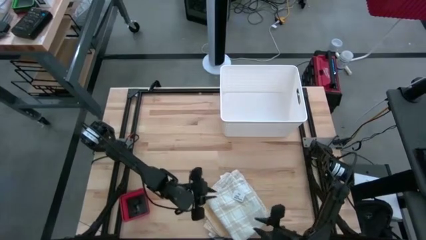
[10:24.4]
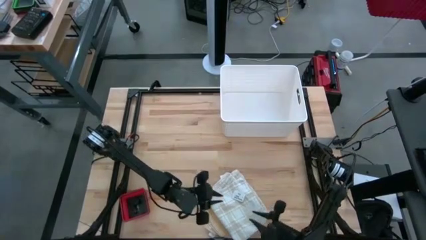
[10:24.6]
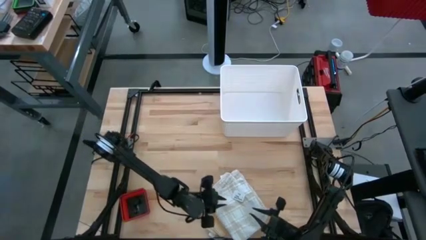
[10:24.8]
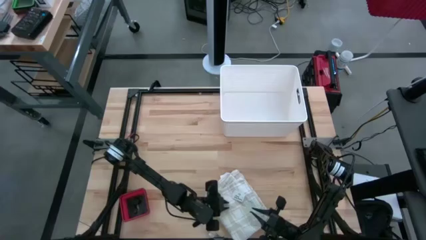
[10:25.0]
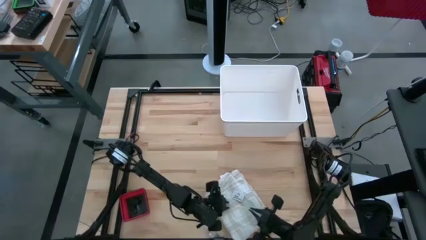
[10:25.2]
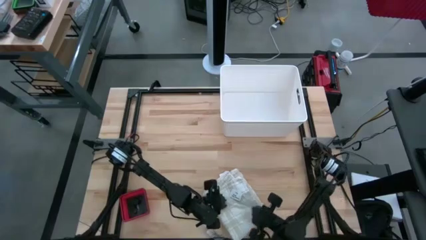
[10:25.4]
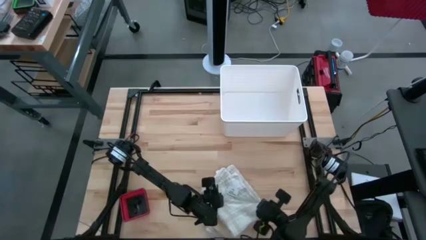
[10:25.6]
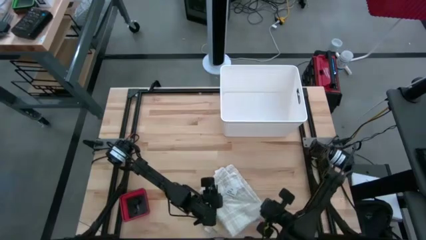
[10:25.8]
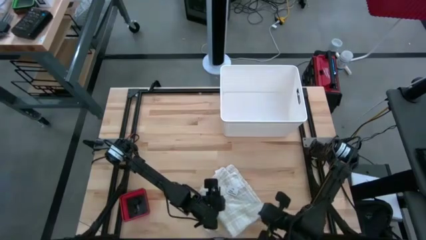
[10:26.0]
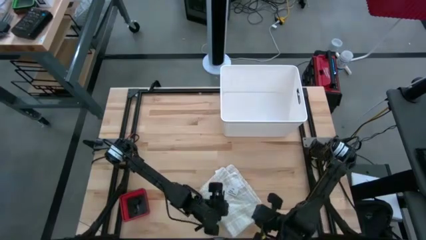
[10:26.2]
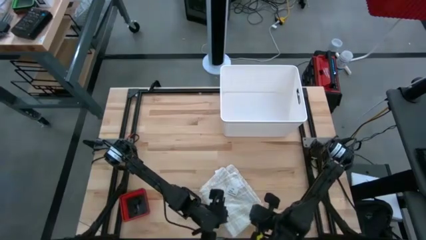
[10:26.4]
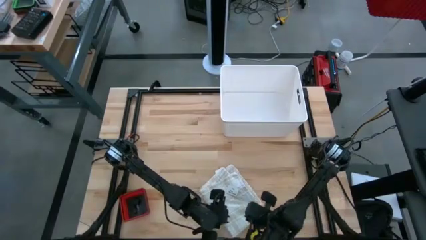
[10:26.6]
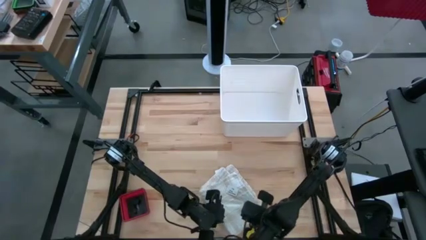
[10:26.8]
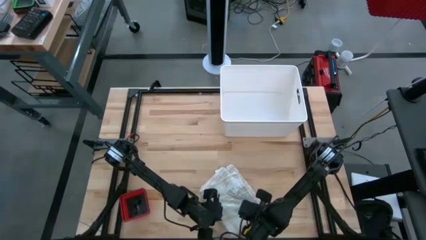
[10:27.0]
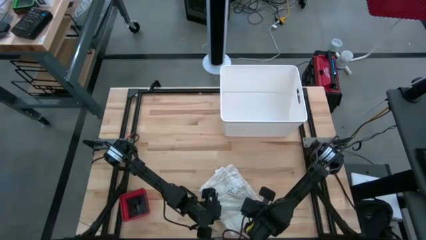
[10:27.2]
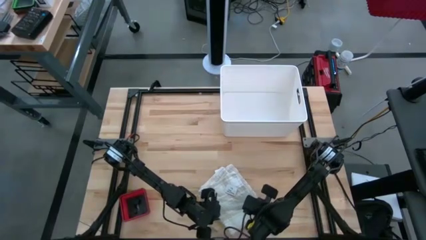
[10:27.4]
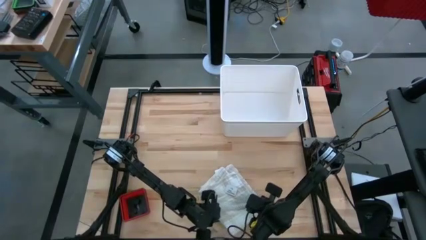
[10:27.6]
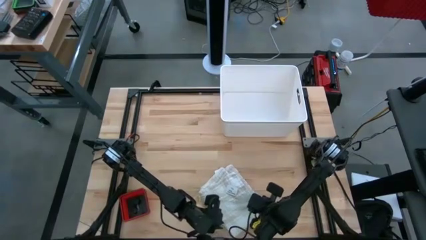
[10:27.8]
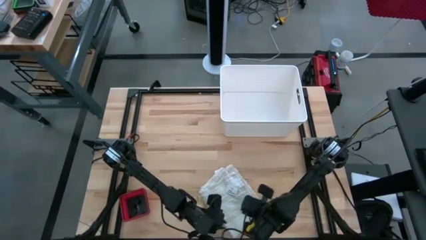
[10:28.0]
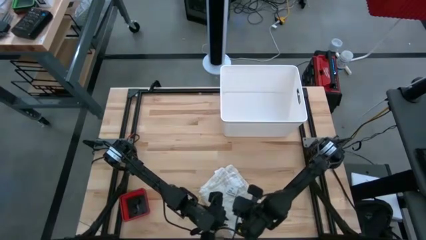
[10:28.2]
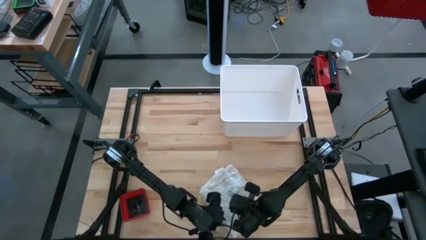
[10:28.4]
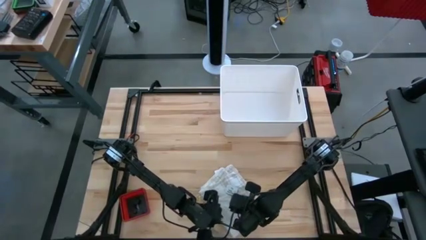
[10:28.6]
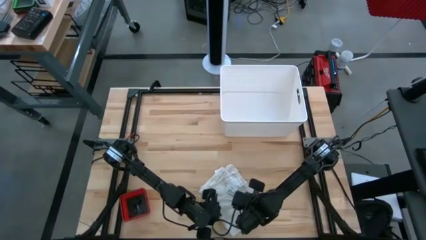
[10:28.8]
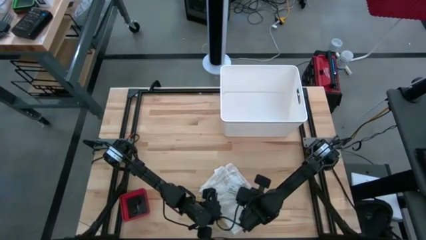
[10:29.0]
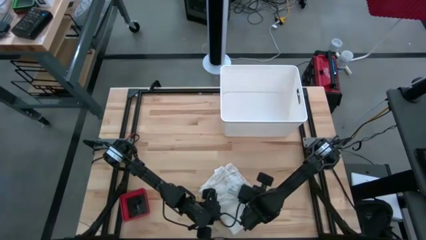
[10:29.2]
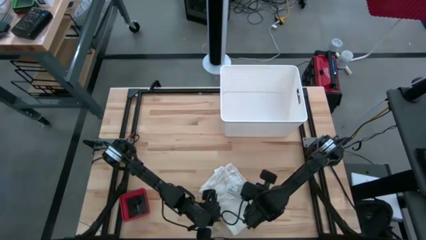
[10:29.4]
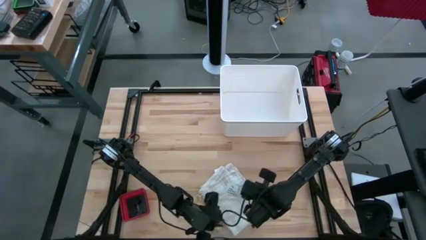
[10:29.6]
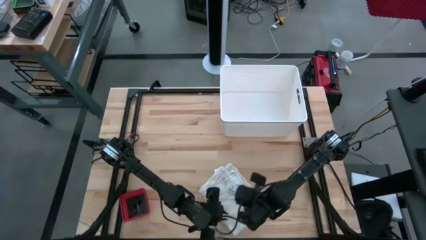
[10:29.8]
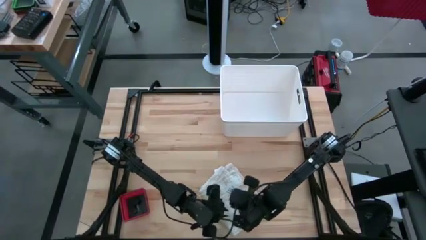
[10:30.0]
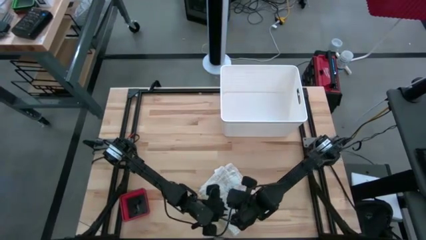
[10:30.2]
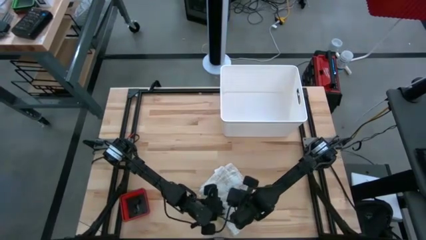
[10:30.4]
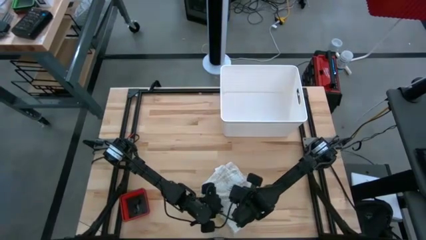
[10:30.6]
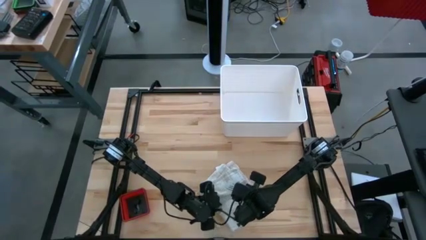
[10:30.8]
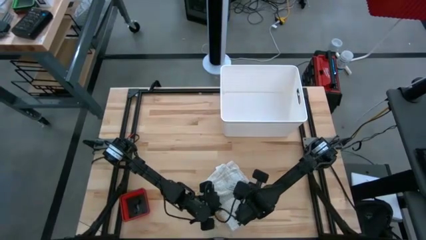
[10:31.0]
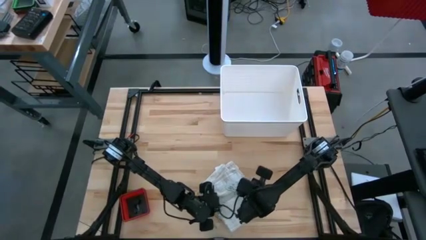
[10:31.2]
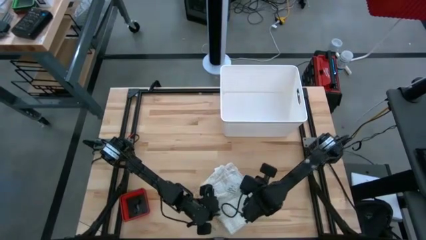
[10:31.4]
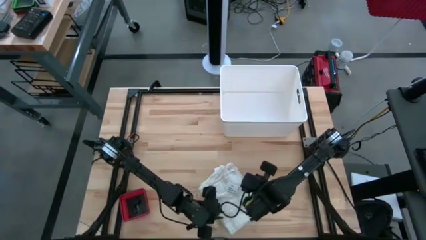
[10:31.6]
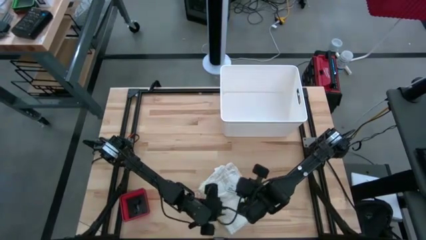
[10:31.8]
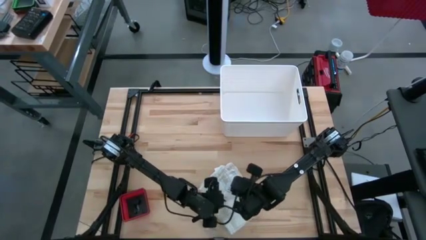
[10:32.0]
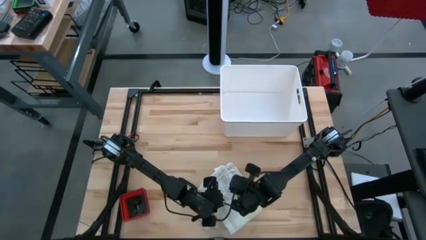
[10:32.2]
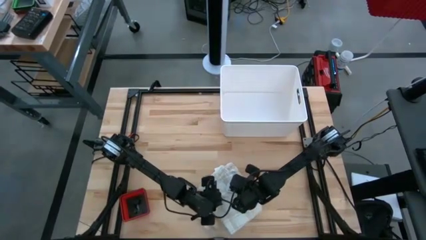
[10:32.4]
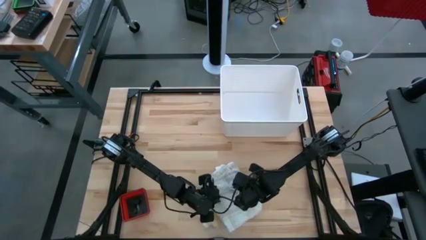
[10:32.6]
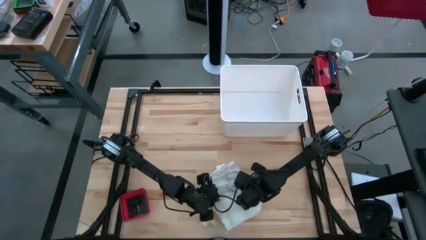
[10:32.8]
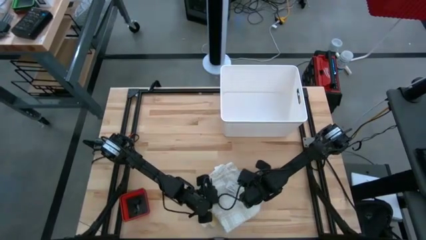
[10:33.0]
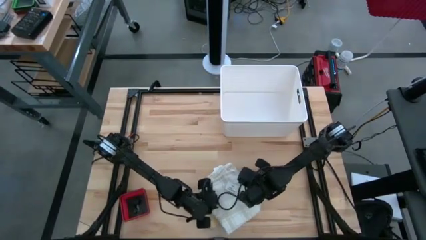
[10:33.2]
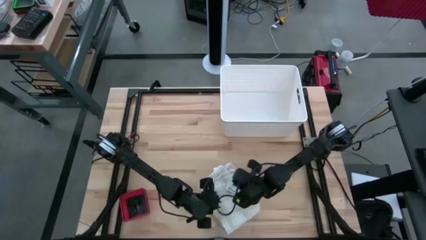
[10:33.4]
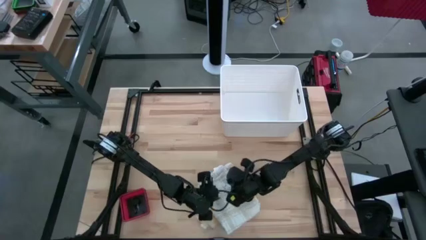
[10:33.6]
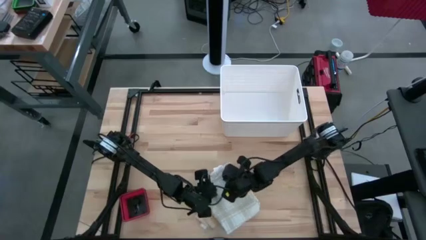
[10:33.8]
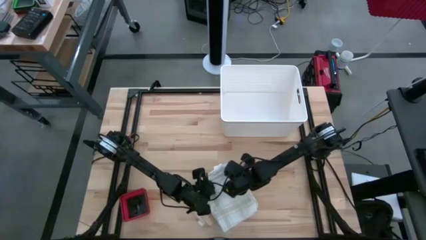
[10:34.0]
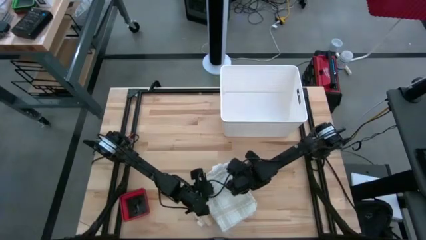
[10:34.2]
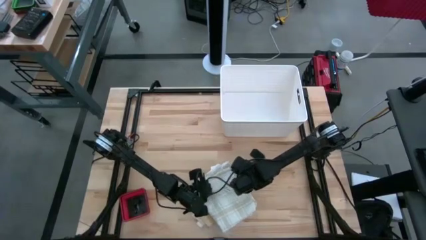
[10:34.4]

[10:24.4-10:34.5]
Task: Fold towel
Stack the light brown kitchen towel on top of the yellow kitchen towel

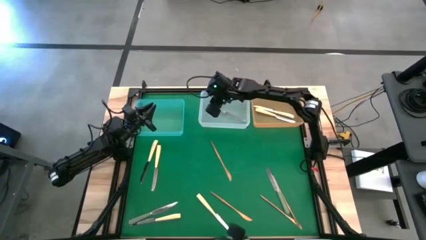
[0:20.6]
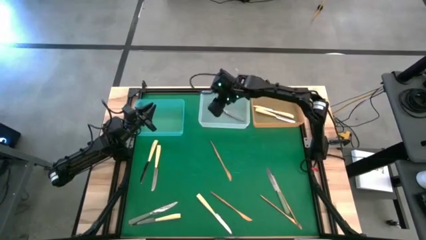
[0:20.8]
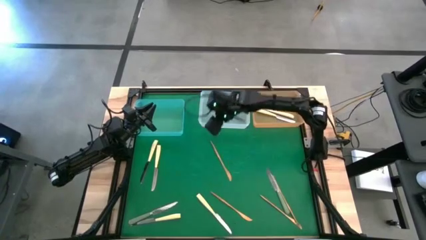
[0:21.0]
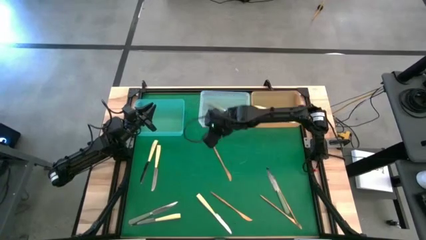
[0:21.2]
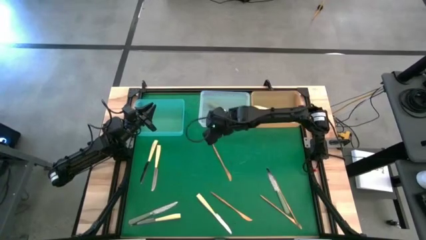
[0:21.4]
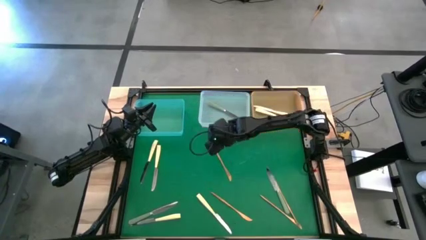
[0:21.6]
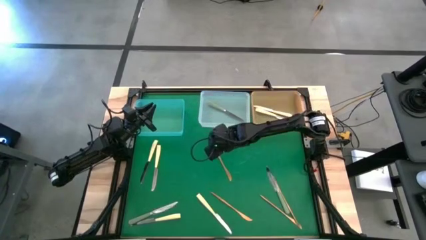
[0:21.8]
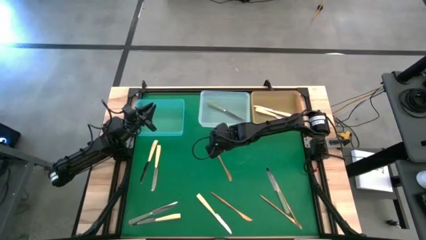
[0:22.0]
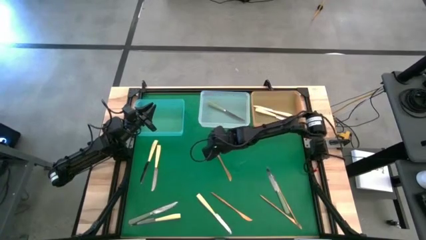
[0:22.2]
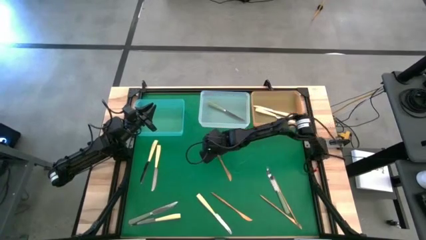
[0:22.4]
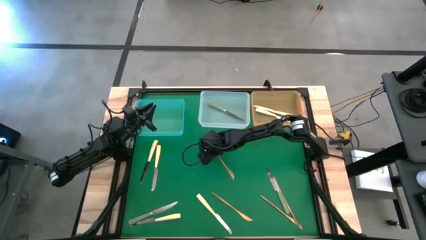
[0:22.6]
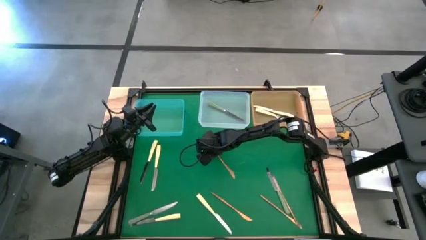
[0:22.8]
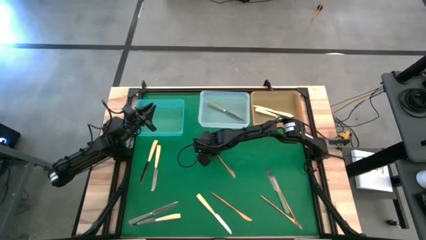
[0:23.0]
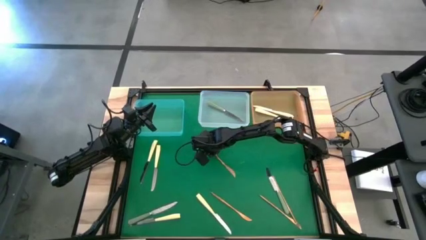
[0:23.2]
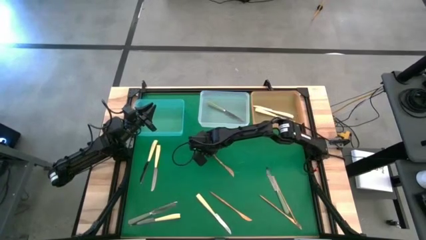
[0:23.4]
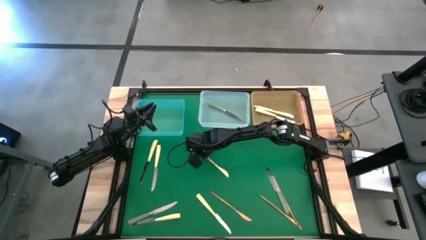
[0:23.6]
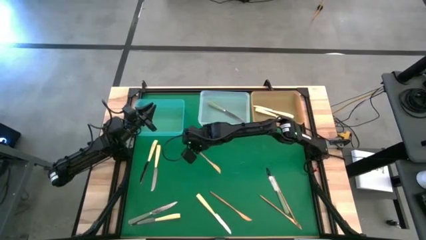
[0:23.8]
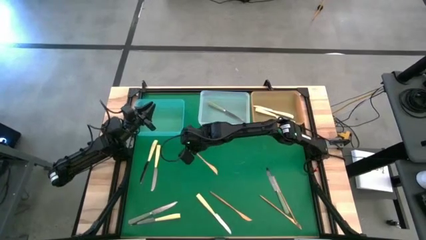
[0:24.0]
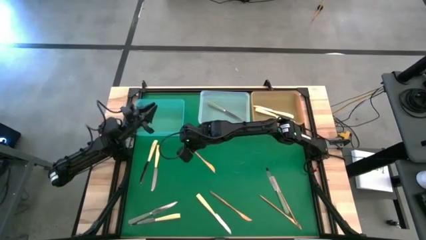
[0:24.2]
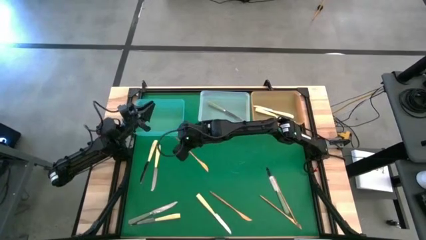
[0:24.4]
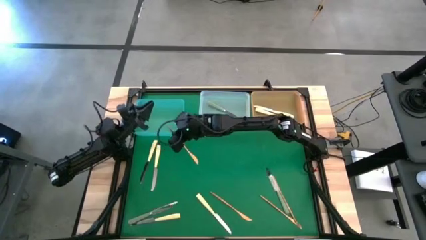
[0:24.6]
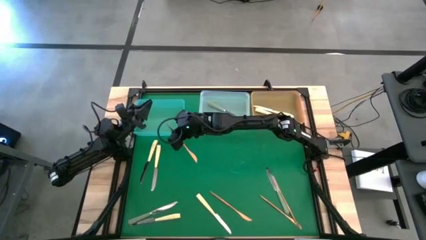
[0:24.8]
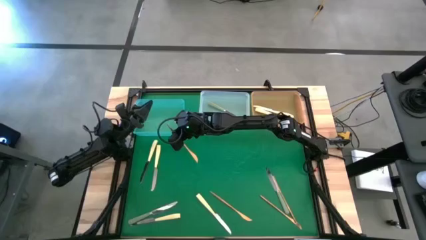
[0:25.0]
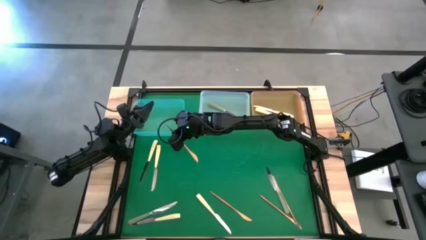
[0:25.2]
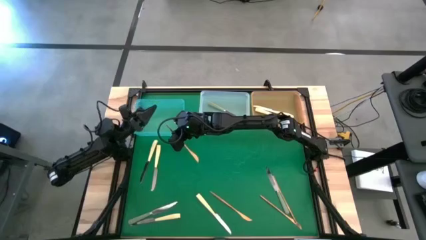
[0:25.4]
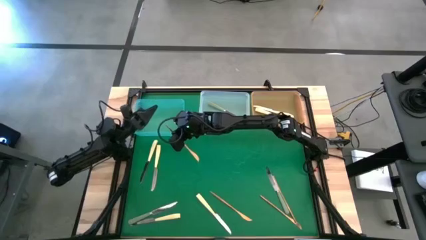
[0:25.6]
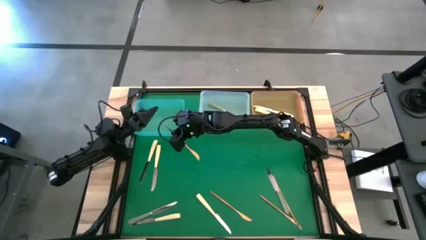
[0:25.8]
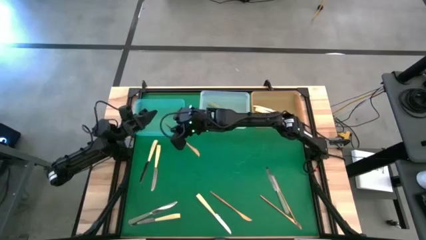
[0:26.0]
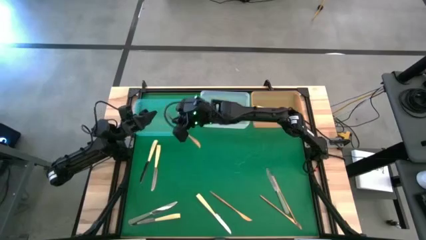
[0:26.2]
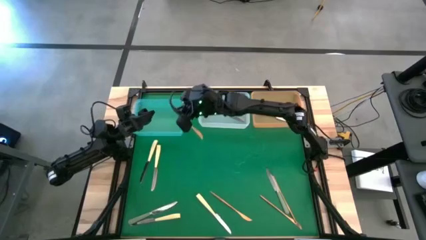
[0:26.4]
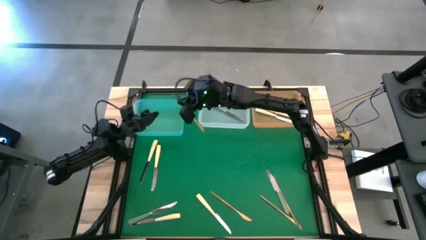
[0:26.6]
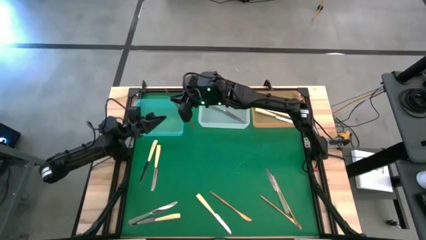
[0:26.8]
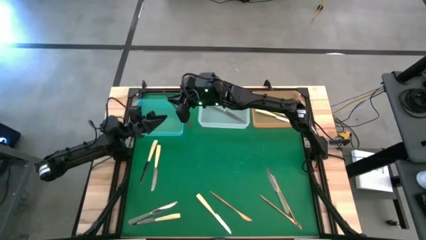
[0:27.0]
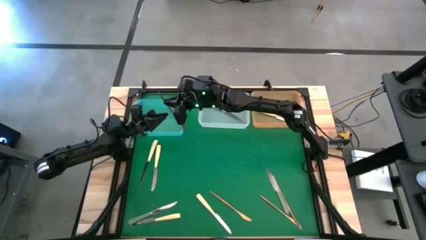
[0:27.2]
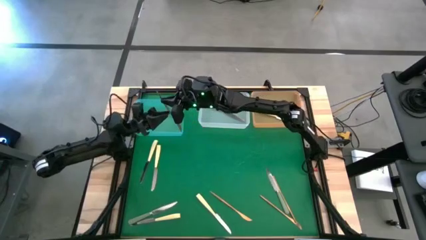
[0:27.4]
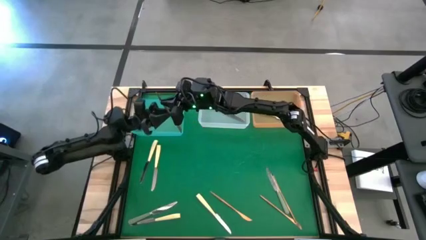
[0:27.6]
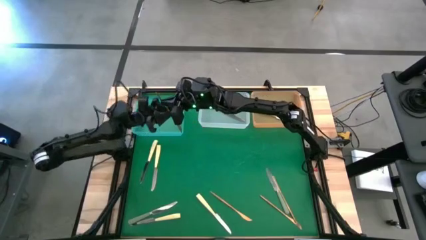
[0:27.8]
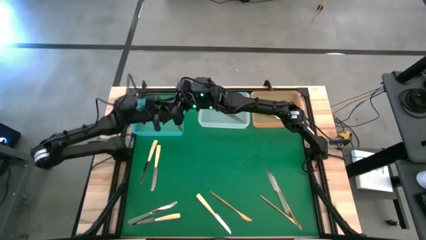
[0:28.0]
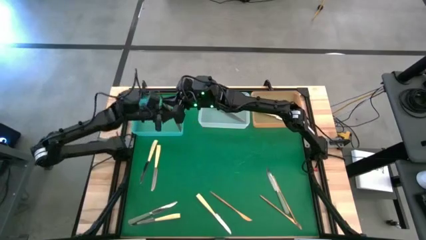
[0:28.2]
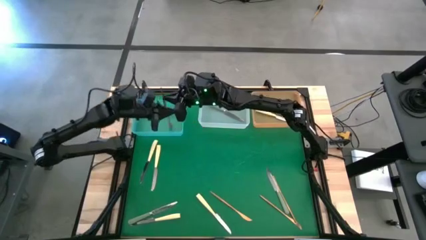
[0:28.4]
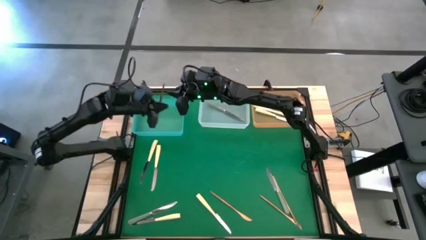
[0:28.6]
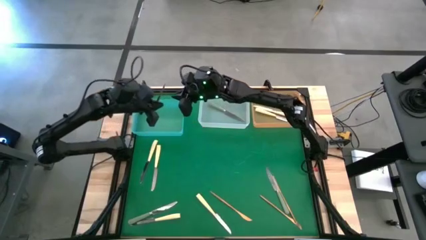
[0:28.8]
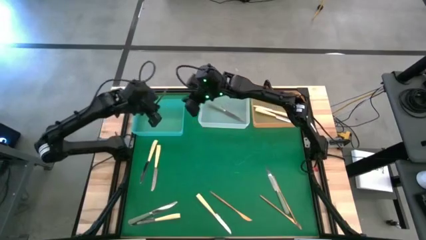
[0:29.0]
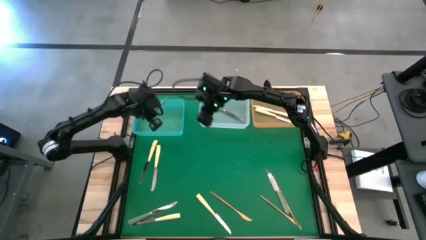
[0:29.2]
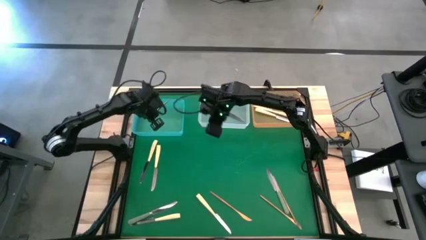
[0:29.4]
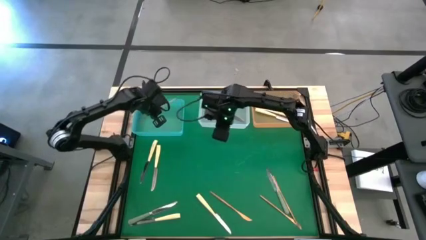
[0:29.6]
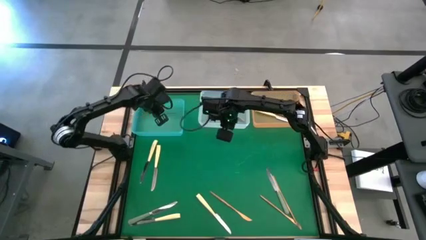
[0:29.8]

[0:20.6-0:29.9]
Task: Sort silverware by color (type)
Put the gold knife into the blue bin
